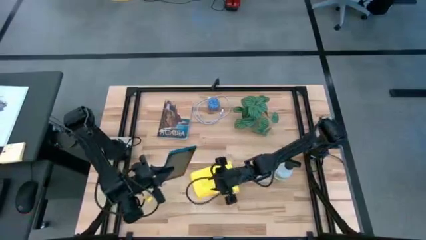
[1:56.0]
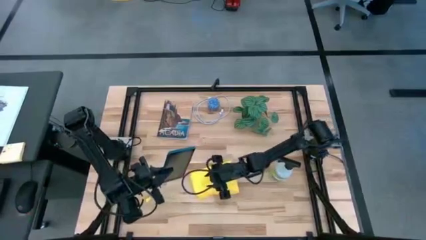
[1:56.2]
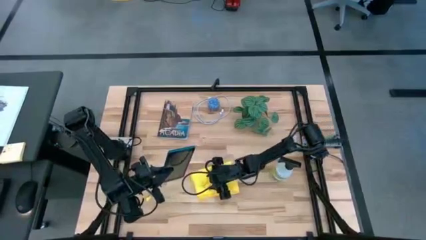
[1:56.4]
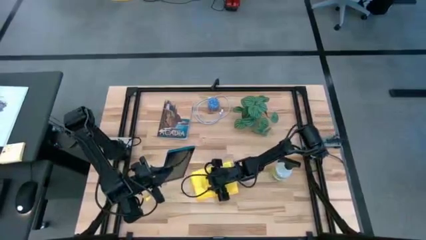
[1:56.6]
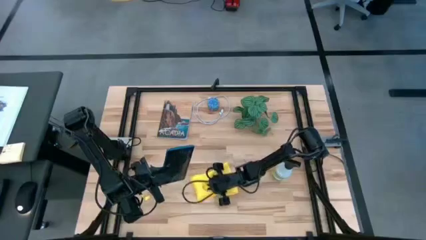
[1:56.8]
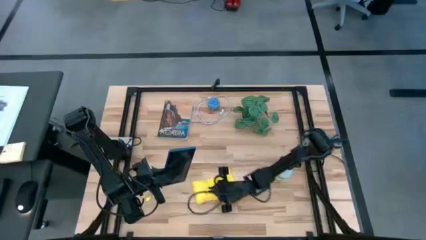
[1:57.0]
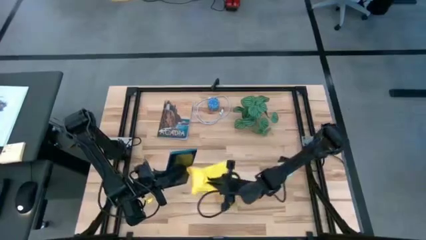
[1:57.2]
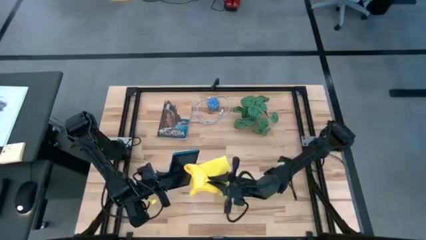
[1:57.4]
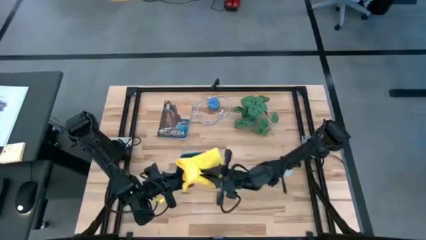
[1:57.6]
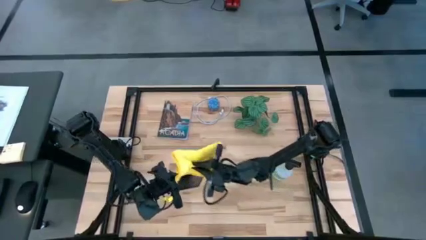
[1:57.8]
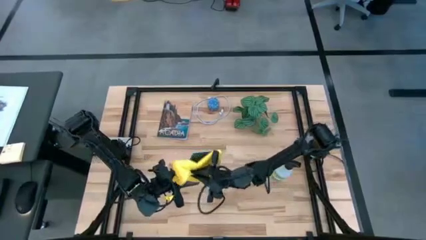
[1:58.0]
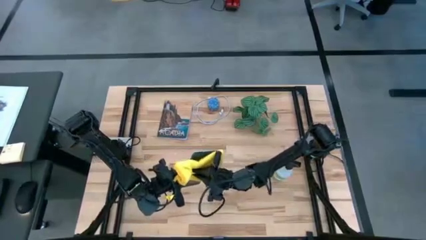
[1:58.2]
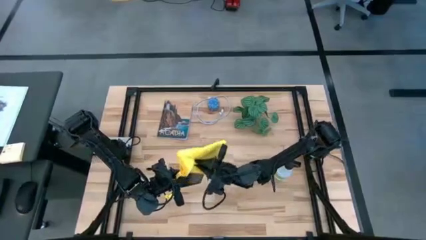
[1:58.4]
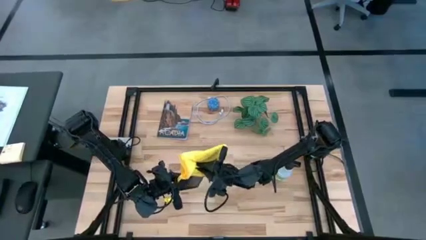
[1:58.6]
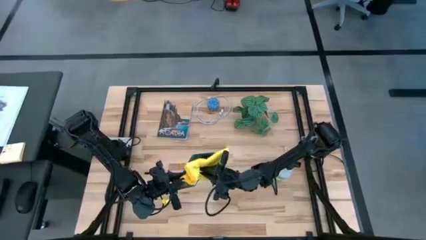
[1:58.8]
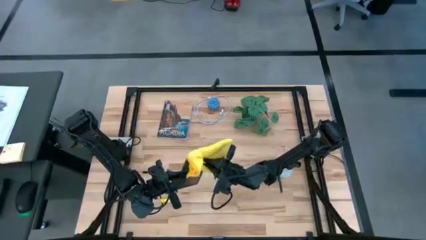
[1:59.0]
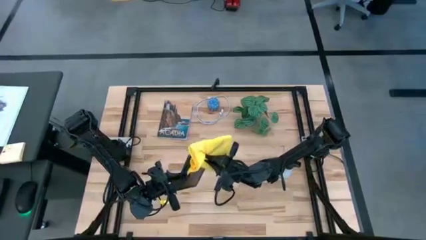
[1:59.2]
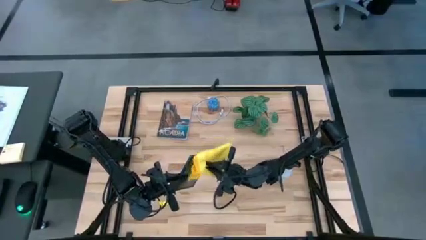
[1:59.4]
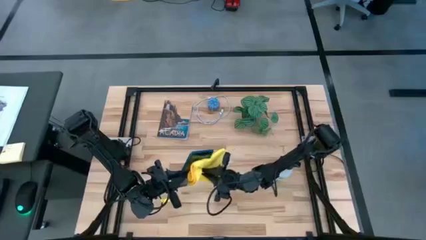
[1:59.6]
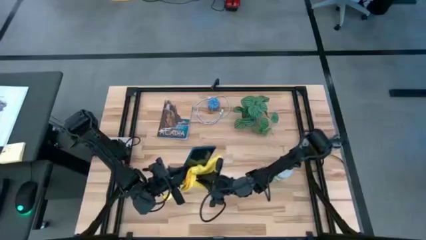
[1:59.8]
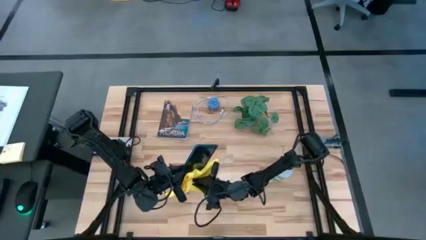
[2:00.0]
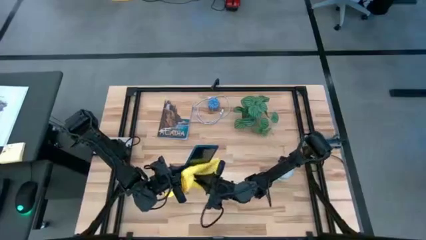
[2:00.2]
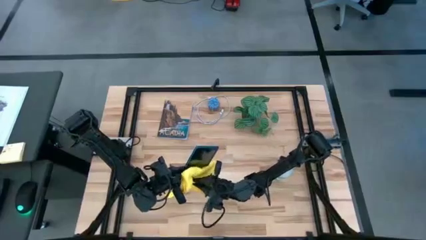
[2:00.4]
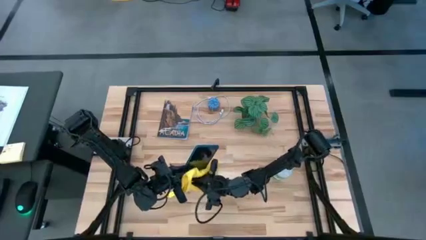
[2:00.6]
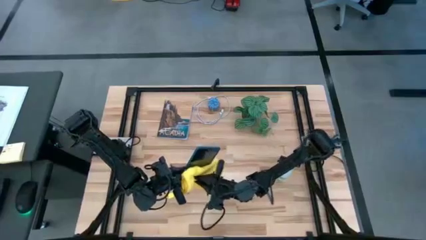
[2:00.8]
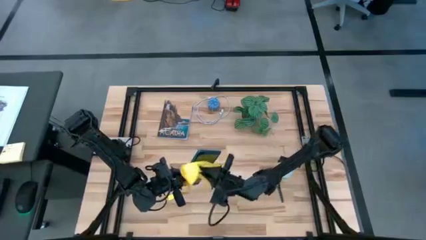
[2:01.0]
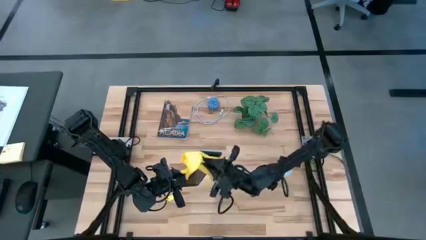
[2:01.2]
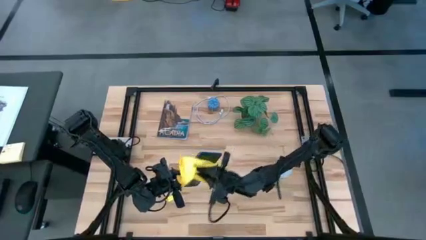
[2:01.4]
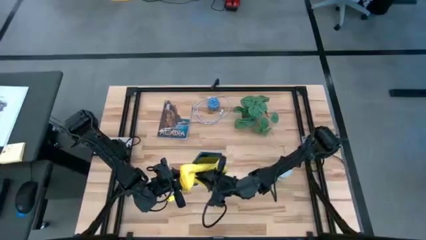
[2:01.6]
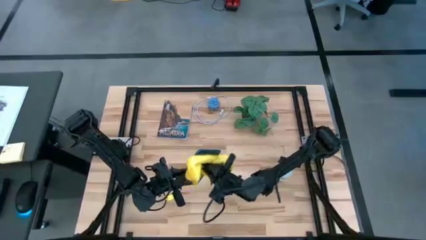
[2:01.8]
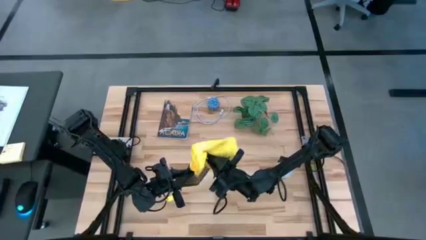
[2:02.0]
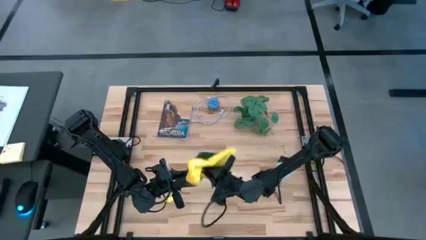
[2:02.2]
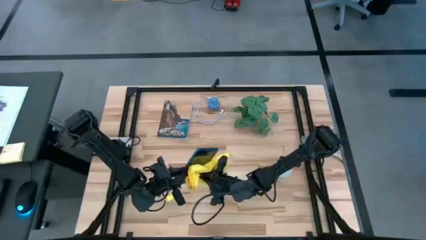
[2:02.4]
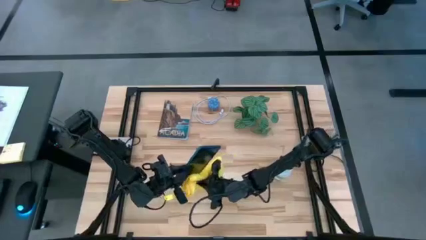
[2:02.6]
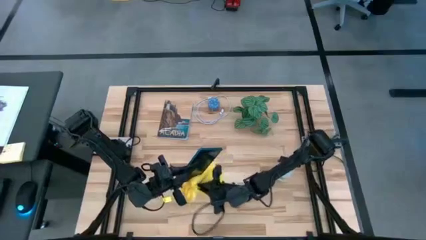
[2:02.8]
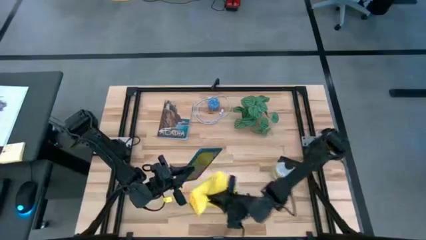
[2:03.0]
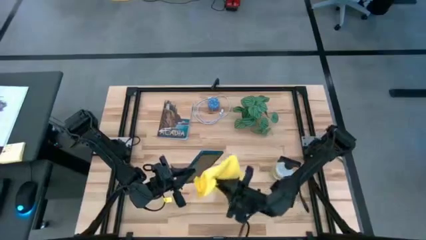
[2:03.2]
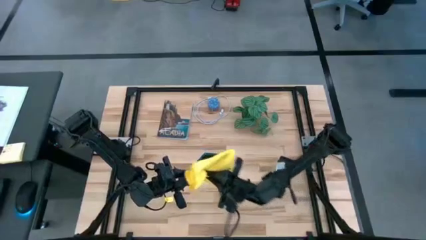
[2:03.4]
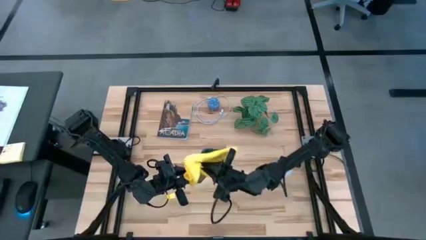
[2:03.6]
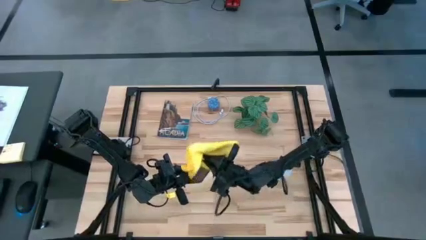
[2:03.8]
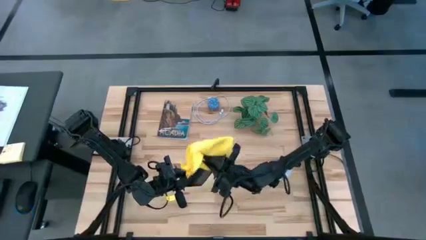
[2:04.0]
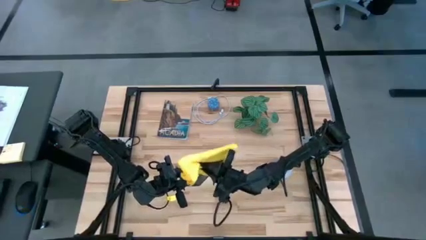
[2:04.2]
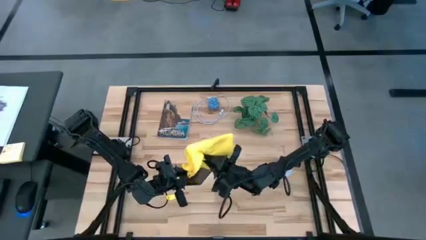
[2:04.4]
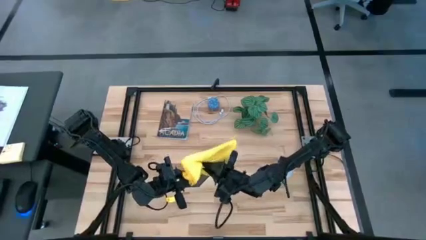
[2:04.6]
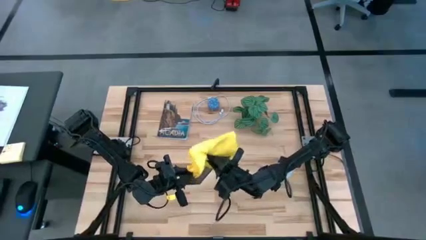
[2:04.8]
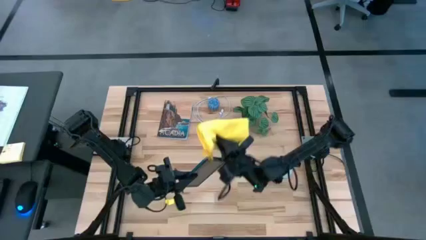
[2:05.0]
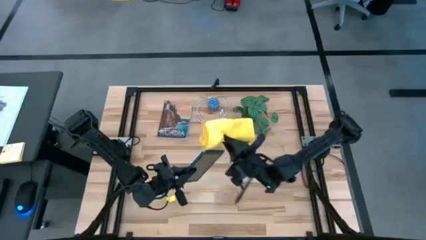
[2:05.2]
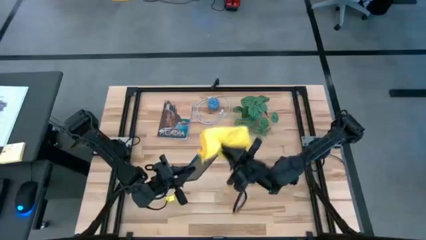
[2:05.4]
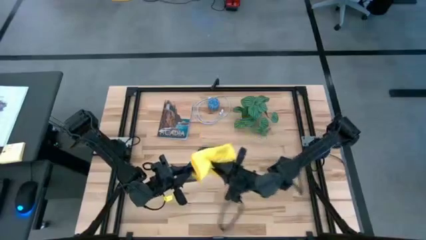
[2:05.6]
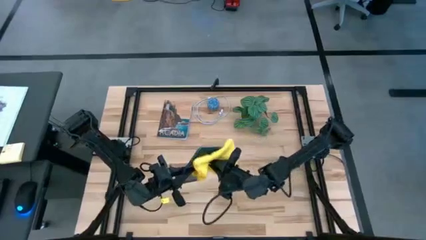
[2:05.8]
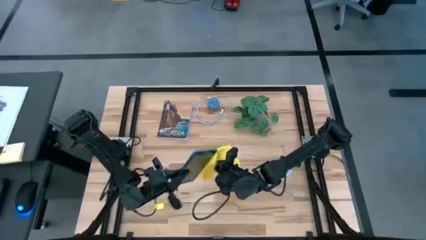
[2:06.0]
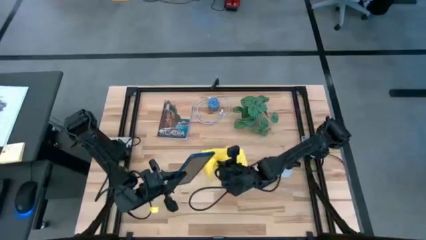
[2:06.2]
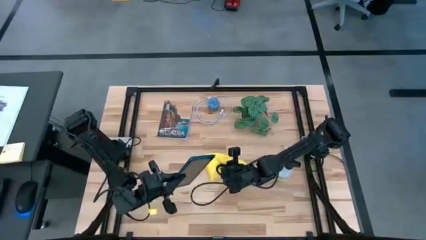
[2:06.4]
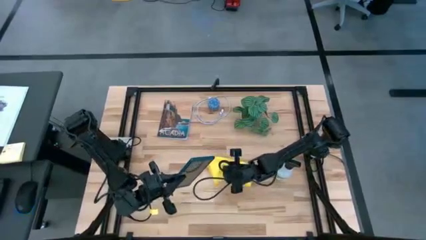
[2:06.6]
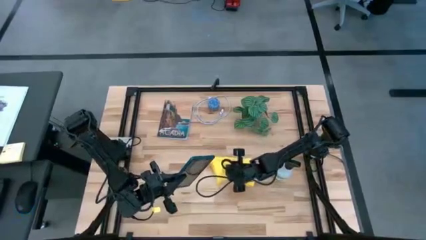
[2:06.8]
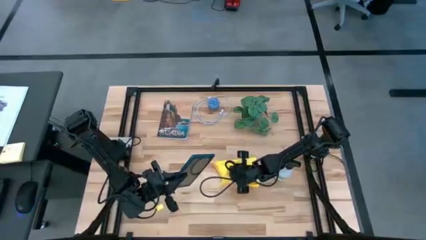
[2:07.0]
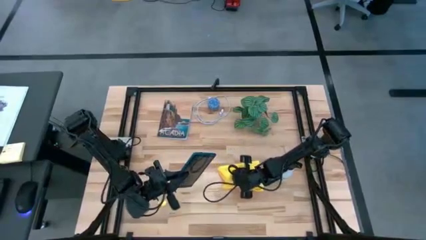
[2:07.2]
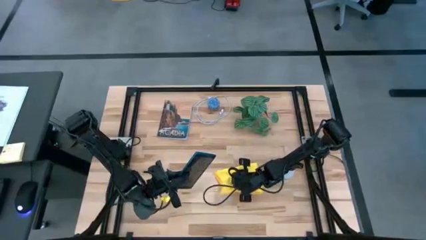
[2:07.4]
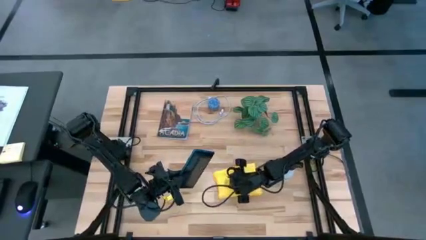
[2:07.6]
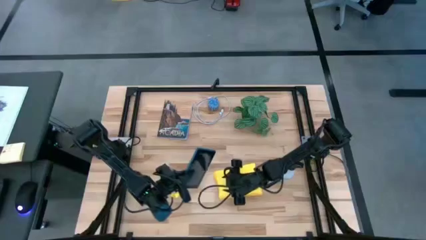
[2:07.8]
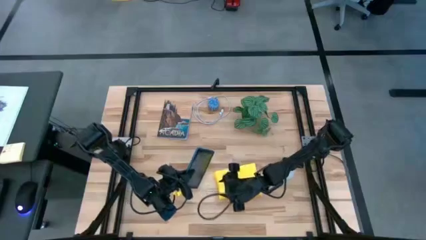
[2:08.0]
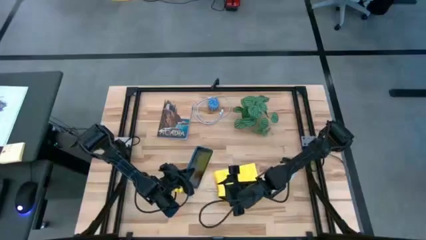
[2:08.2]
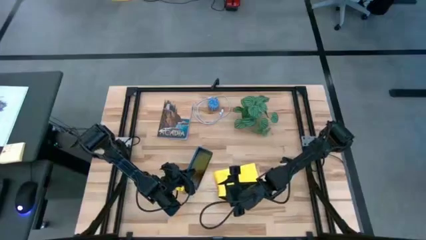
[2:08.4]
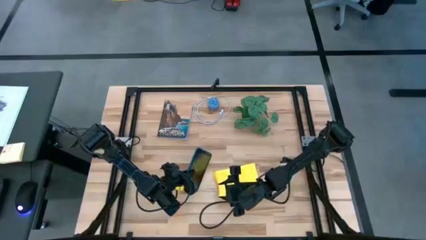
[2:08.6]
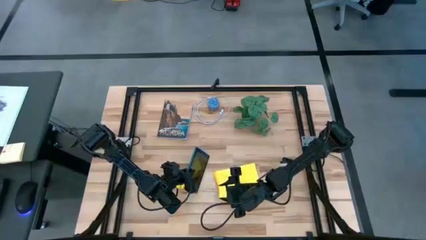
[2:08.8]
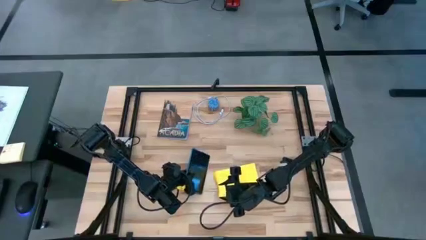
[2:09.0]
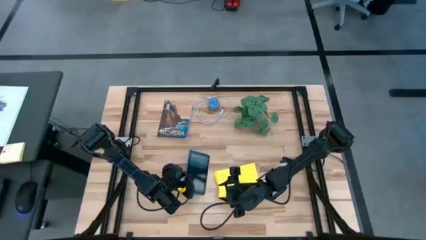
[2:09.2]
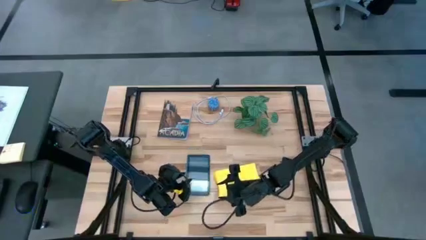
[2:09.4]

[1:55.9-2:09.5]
Task: Apply microfiber cloth
Wipe the blue tablet with the microfiber cloth
